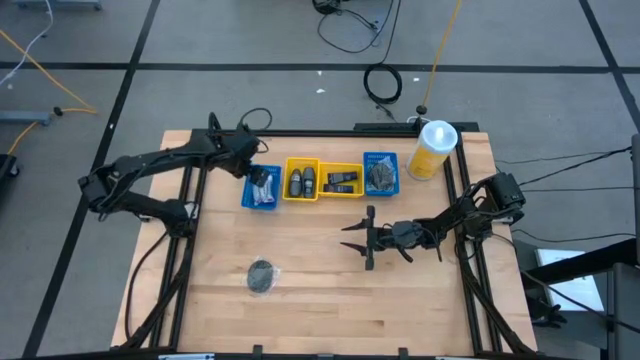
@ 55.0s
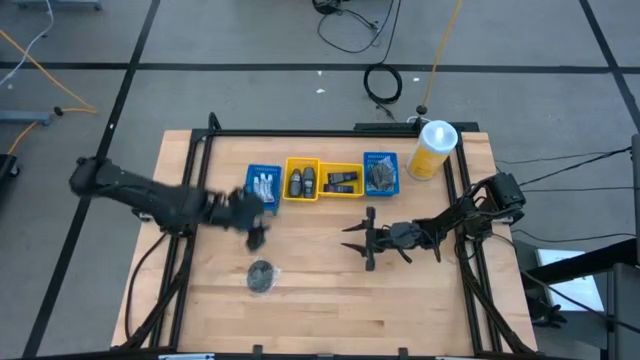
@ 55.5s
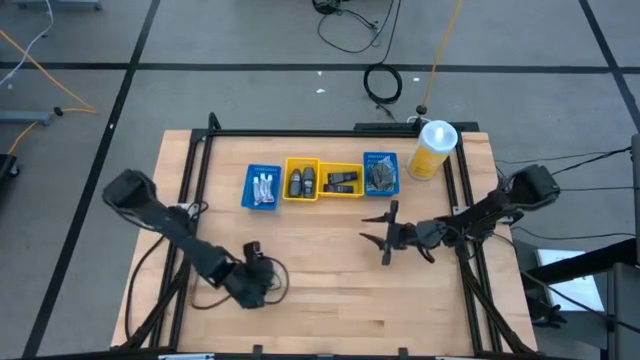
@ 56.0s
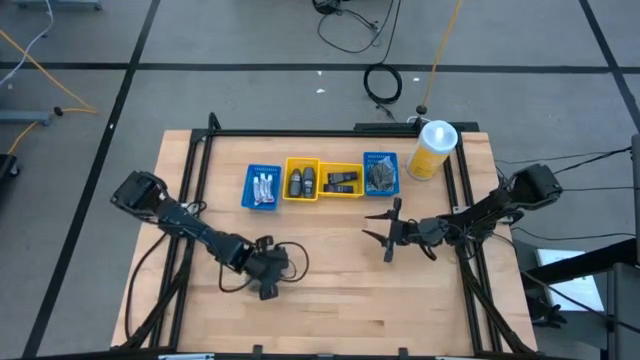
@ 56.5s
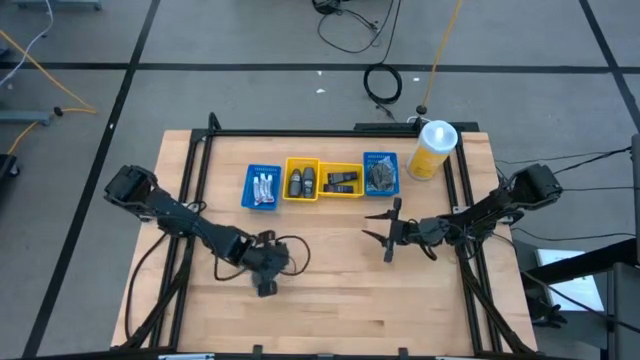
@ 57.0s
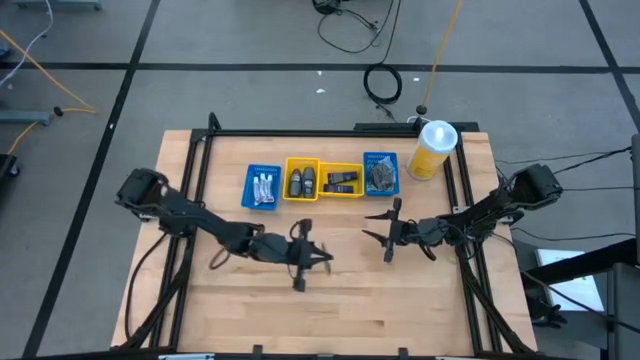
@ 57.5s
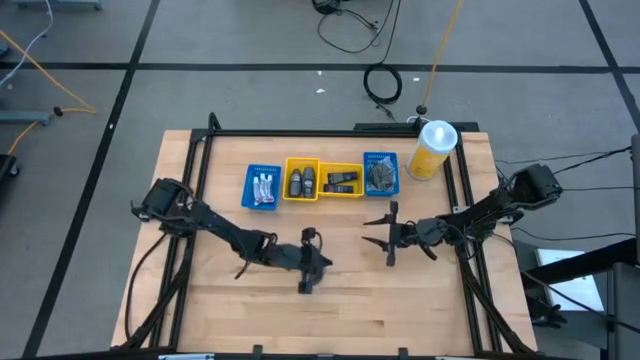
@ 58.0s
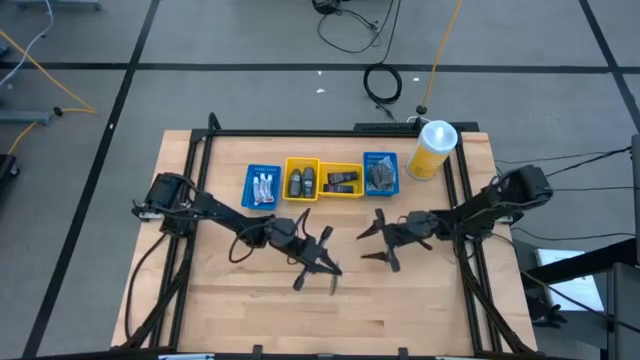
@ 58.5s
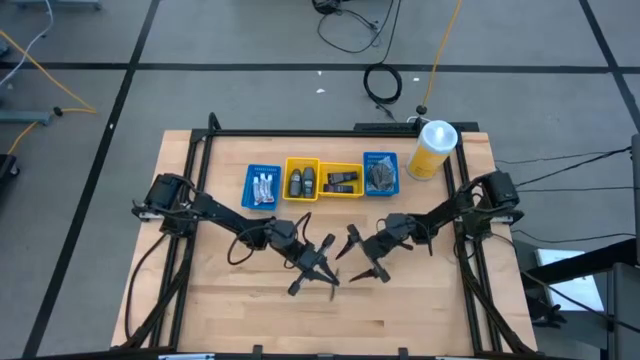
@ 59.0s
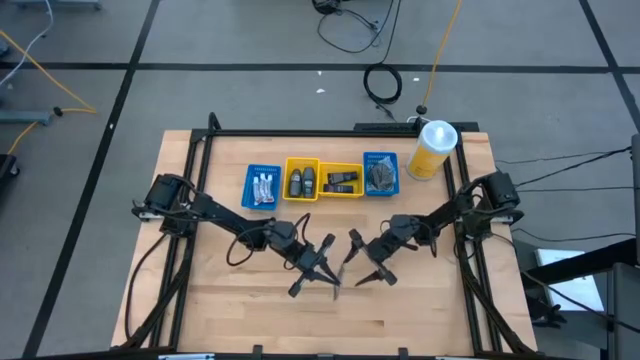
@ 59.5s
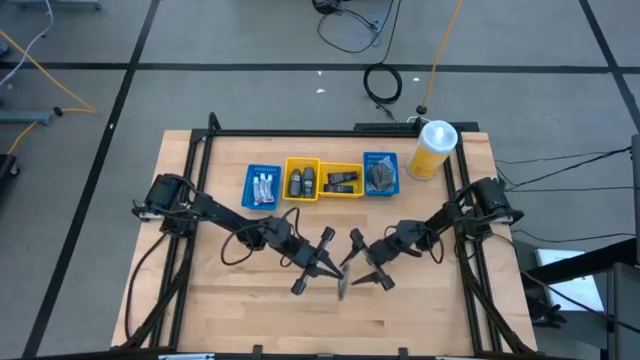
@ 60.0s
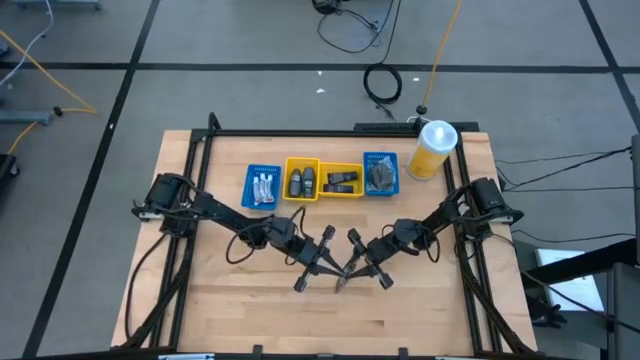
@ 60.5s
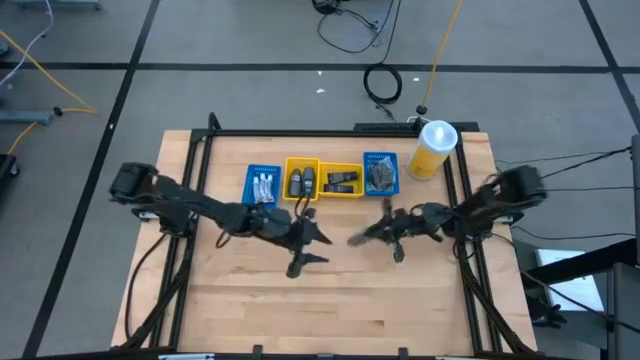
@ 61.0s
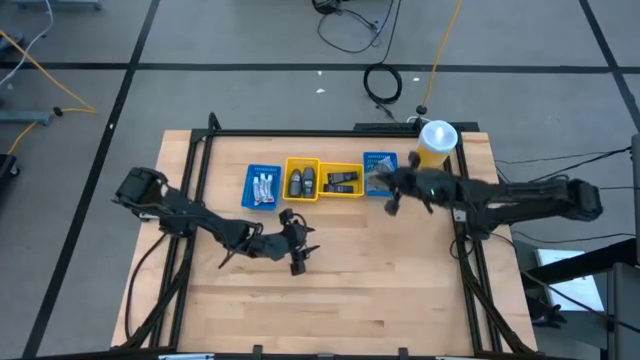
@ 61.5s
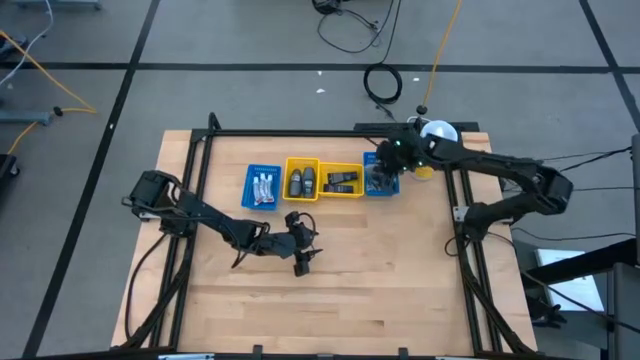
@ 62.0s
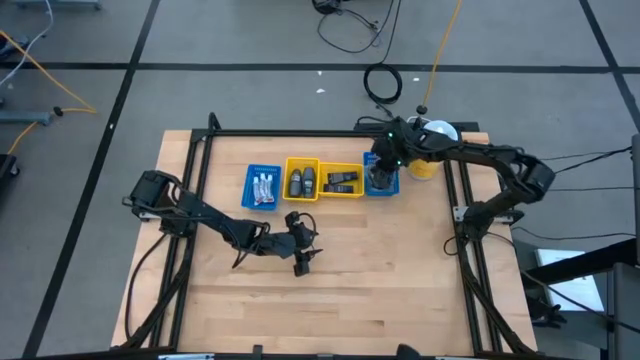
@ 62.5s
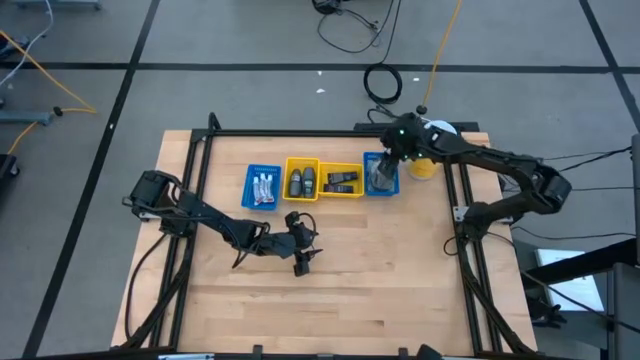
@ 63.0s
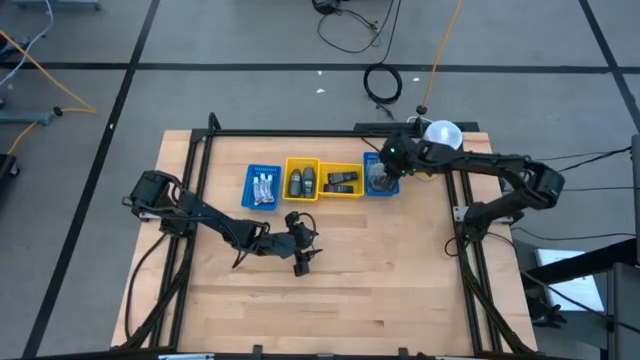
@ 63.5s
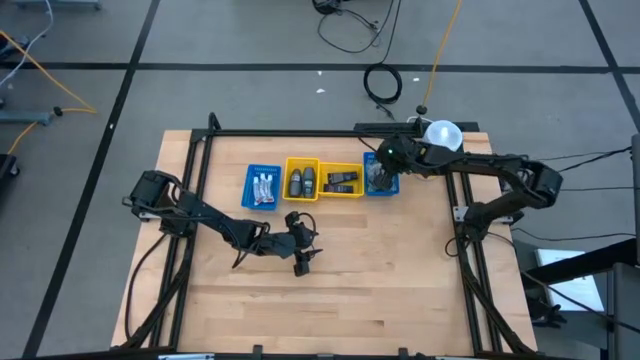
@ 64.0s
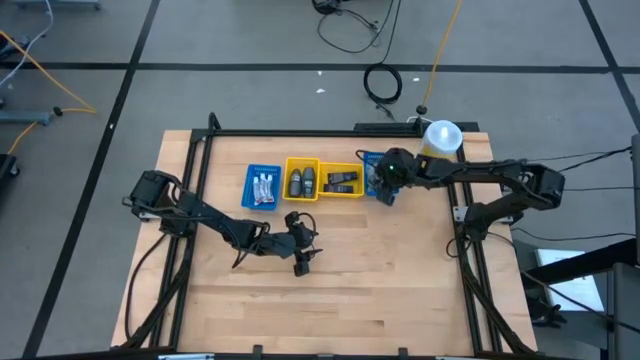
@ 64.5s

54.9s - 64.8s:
Task: Pick & Place Travel size toiletries
Put the hairbrush into the right blue basket

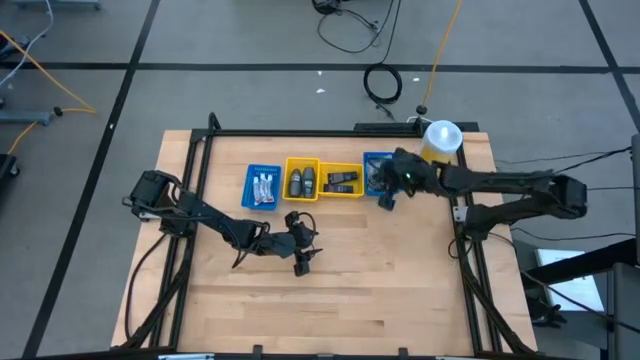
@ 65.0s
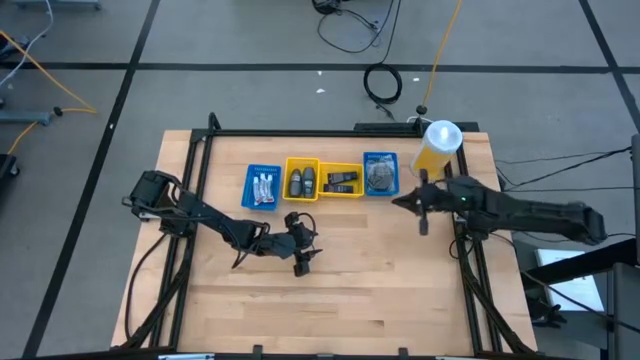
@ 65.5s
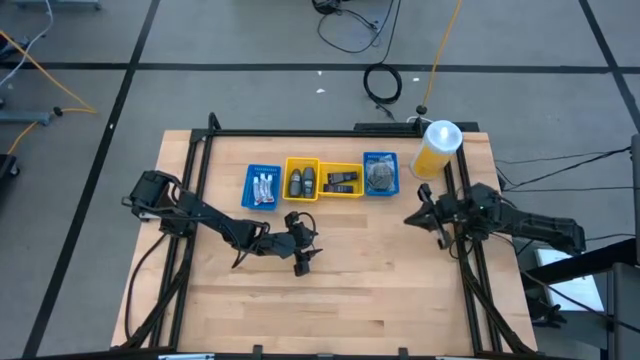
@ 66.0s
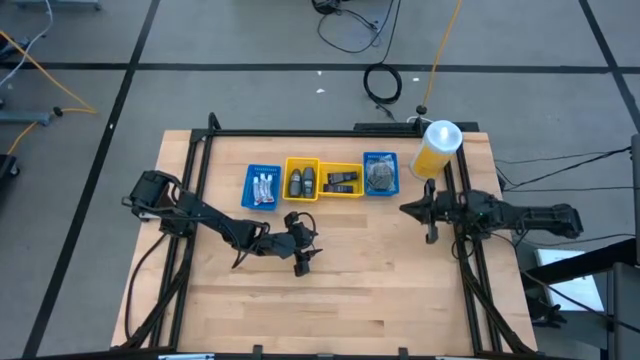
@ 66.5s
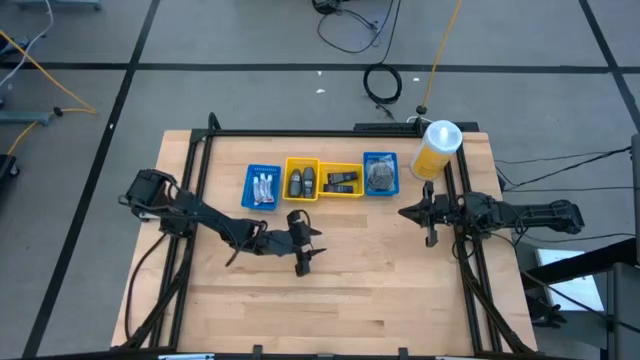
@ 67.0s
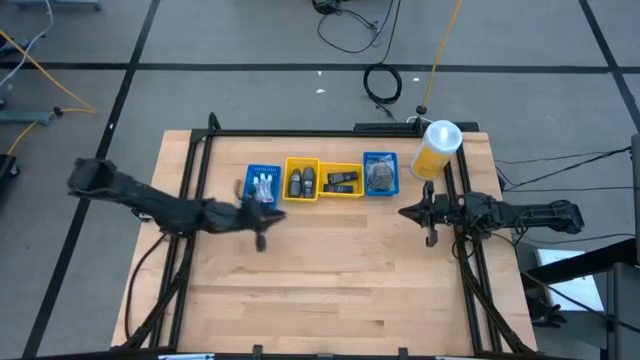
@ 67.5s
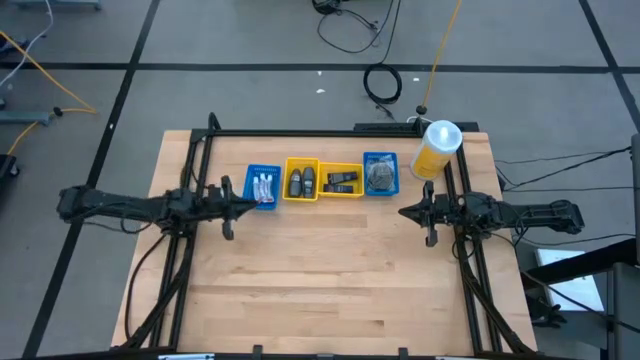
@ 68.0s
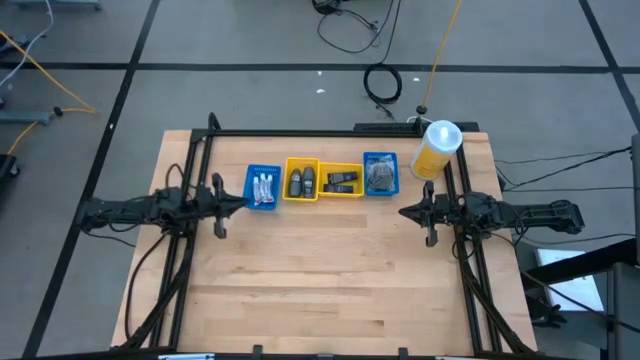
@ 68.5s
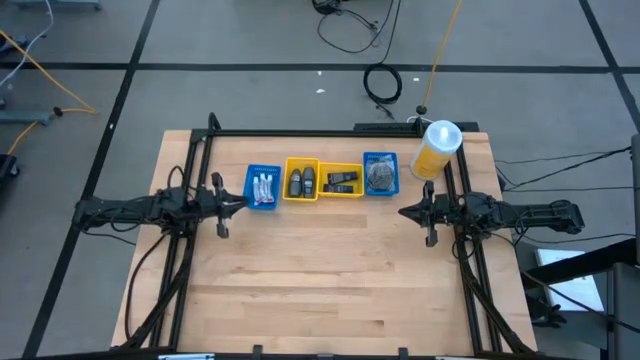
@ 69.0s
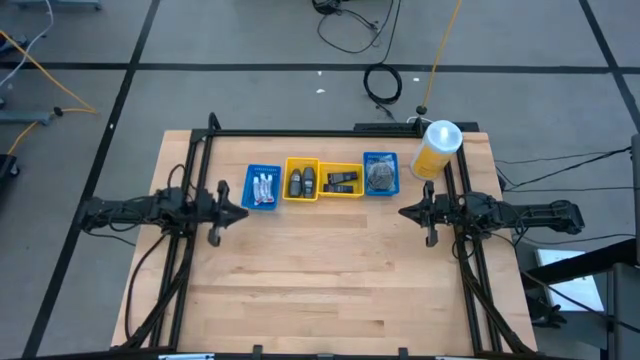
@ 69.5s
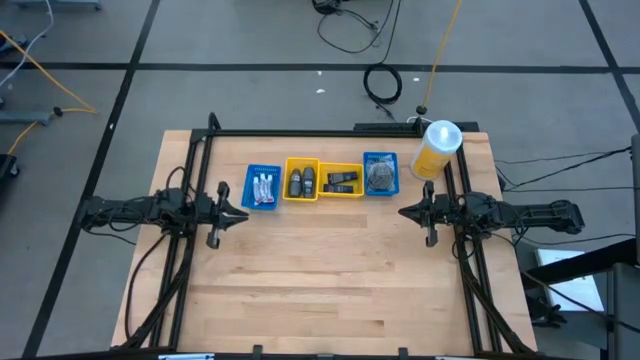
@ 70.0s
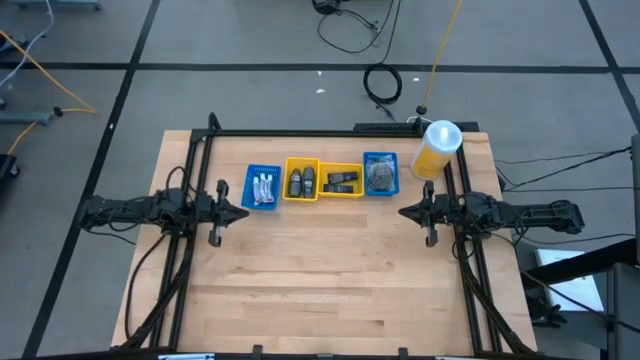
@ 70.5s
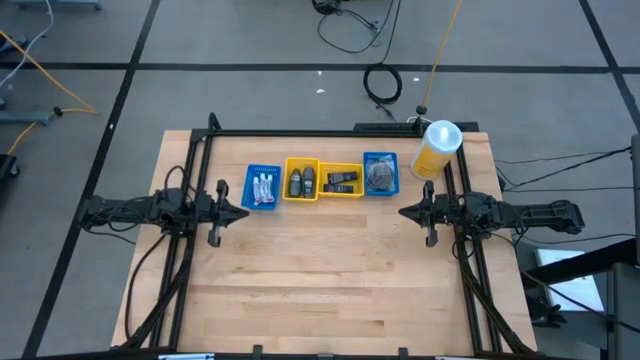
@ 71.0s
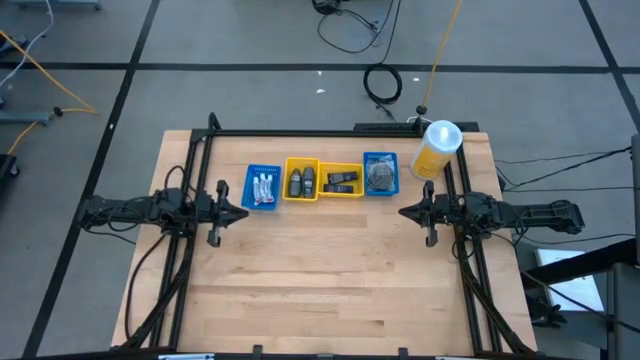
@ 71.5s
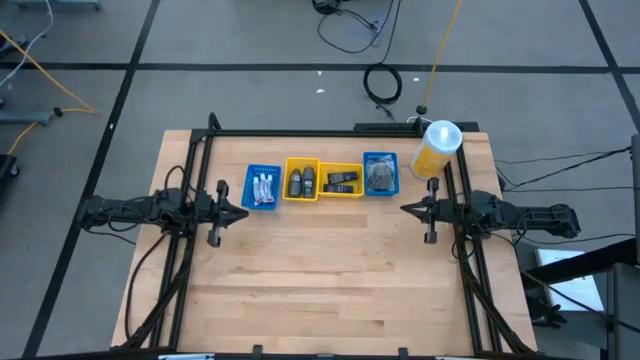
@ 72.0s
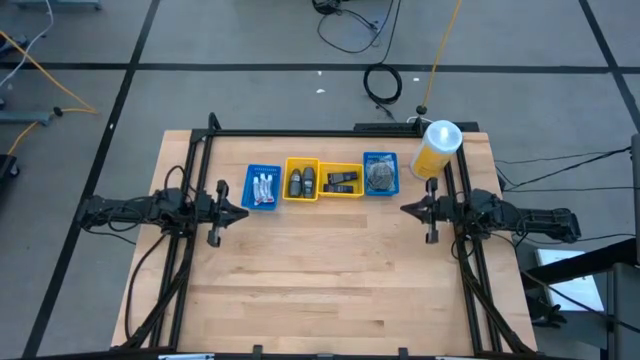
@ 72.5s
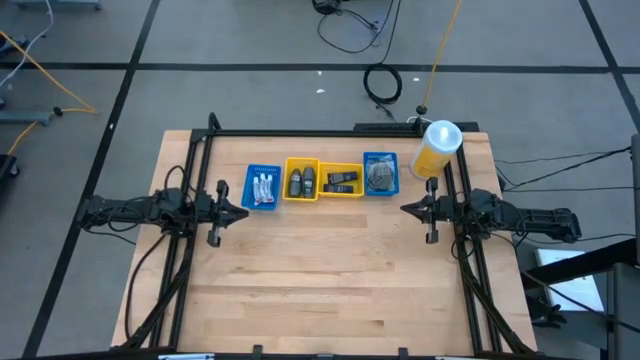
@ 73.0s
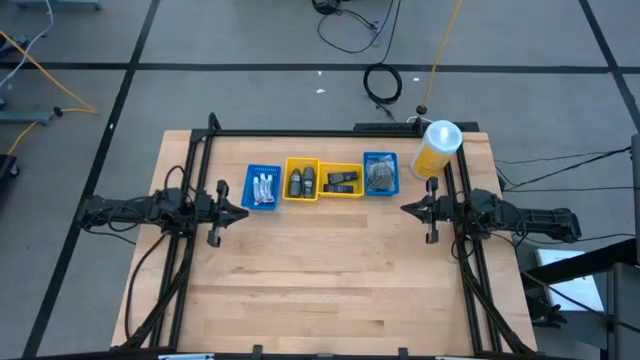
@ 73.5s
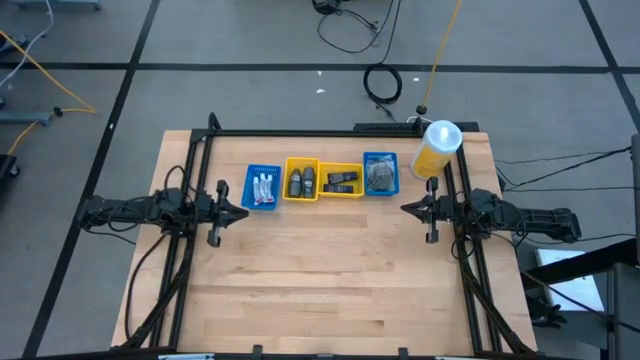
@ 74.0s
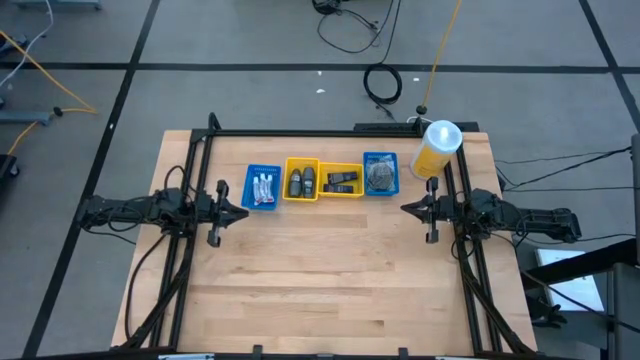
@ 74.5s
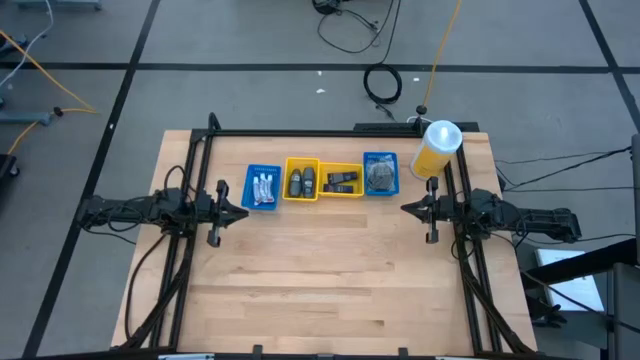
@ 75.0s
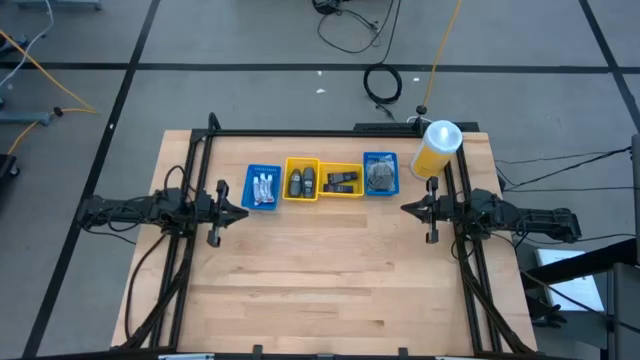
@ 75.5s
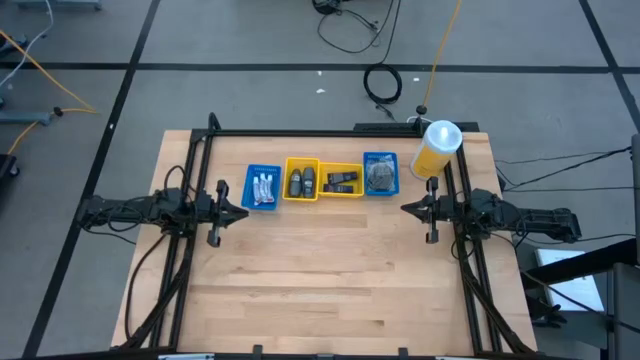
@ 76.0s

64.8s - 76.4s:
Return to Home Position
